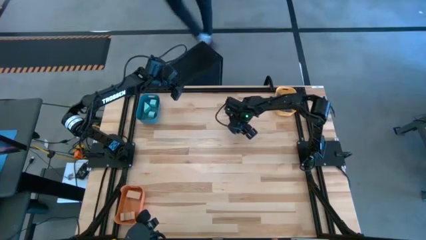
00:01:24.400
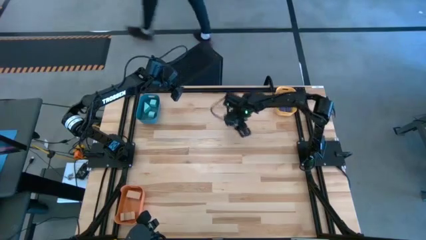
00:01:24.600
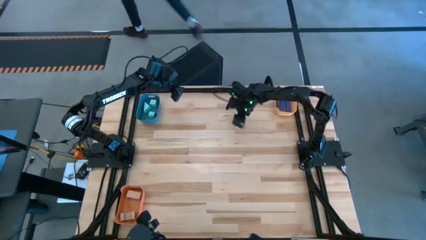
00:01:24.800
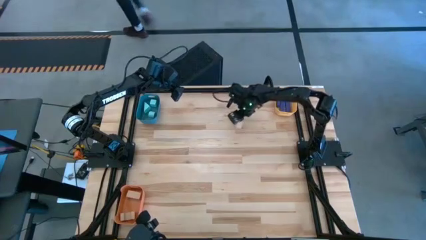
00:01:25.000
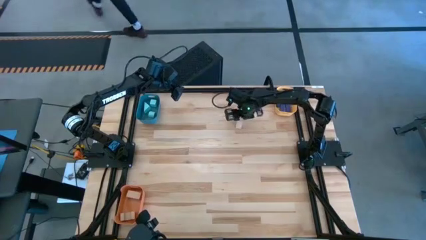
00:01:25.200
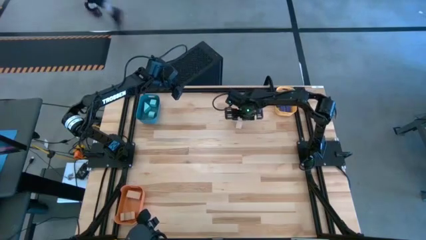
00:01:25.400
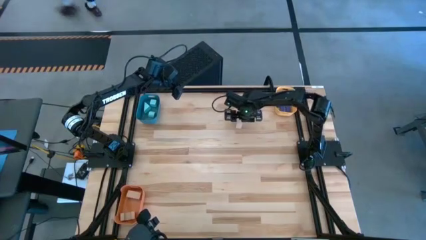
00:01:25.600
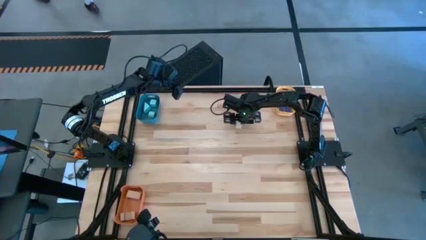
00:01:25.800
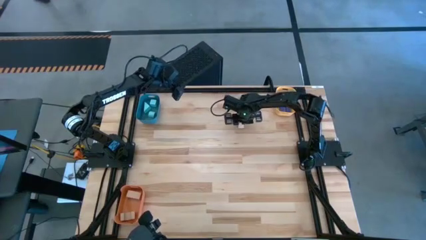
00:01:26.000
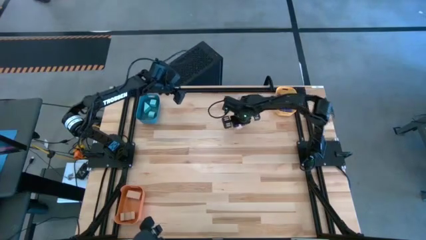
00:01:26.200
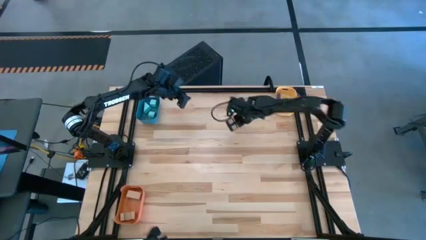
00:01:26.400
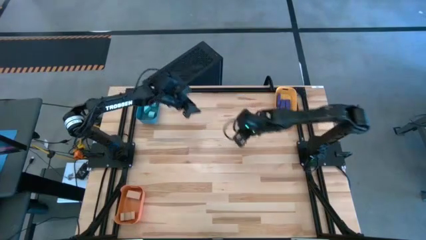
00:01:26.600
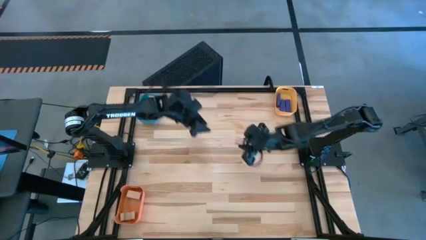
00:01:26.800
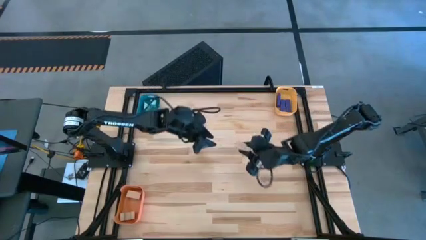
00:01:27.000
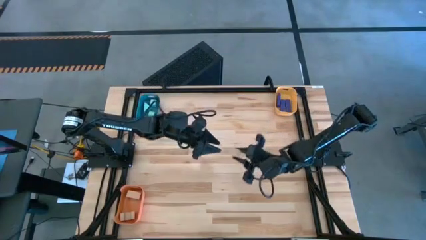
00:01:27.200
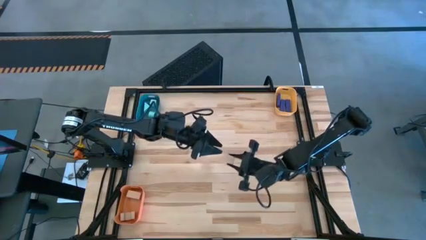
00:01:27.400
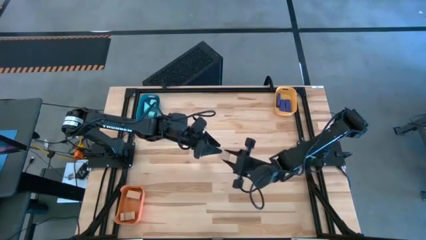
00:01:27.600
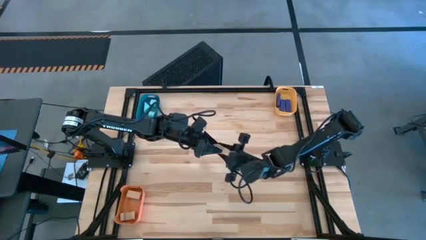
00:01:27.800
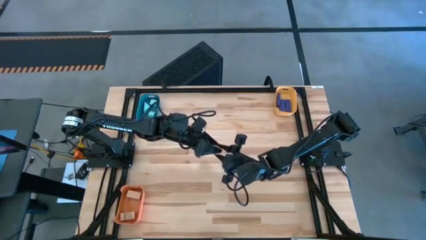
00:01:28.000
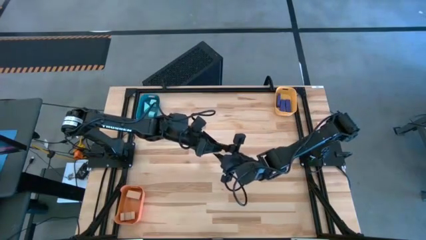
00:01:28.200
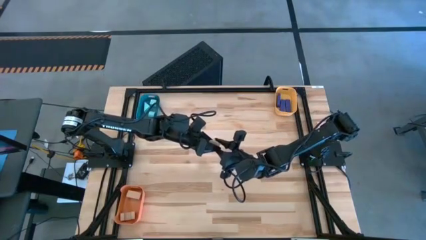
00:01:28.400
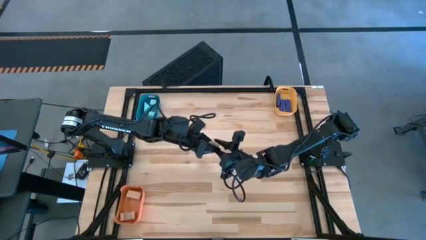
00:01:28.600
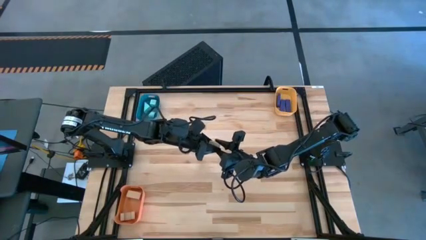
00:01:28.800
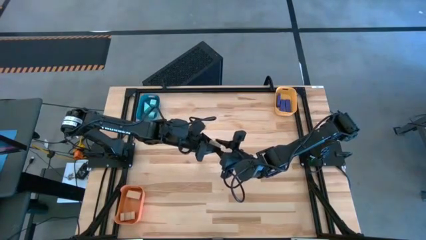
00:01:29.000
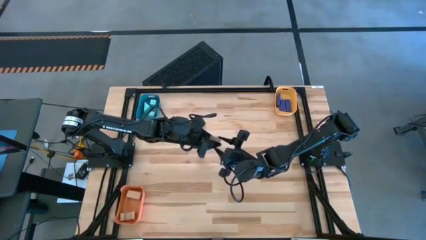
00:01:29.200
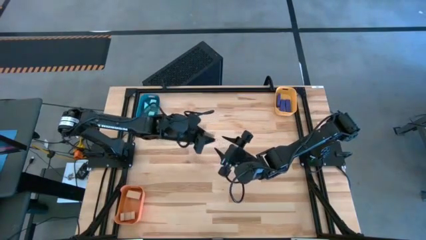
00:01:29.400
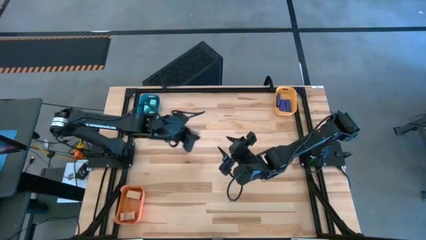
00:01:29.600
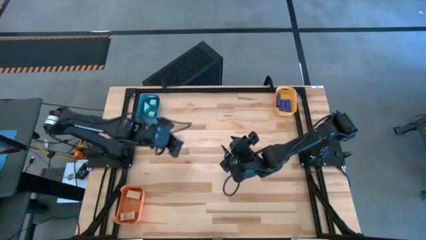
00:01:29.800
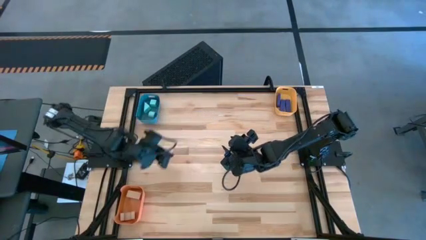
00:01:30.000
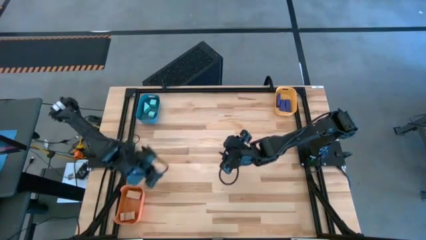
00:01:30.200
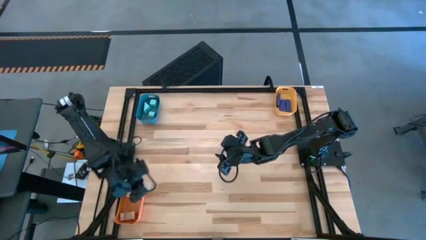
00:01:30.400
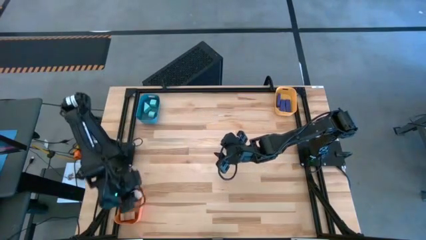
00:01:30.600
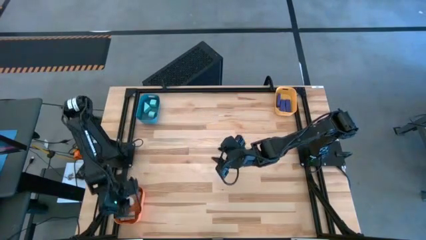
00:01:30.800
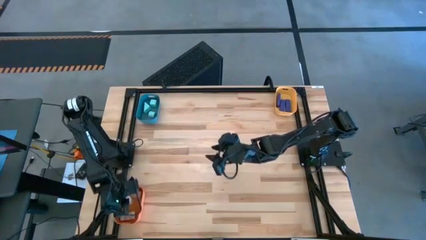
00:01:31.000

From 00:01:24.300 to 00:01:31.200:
Task: Sort & place blocks by color
Put the brown block into the orange bin

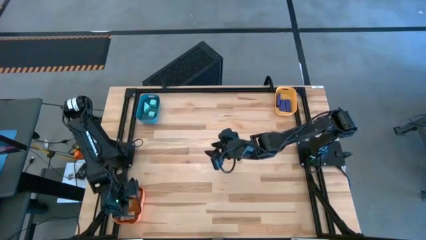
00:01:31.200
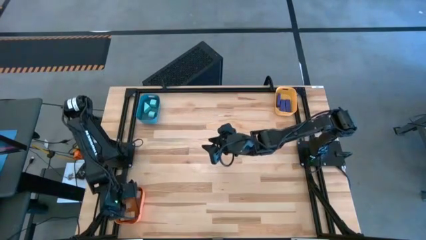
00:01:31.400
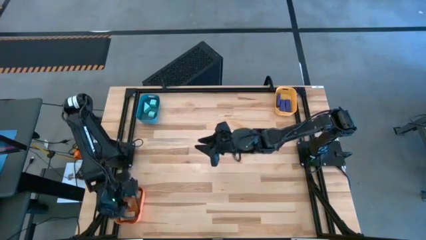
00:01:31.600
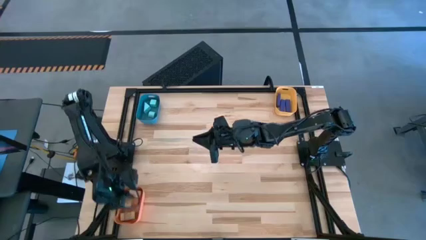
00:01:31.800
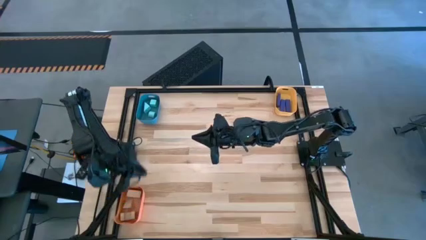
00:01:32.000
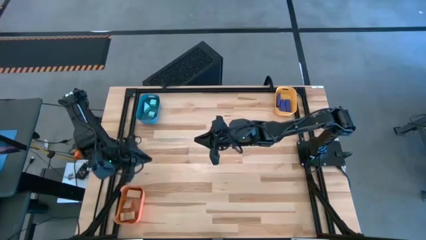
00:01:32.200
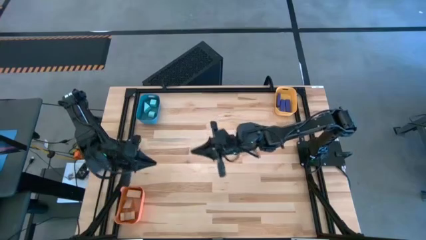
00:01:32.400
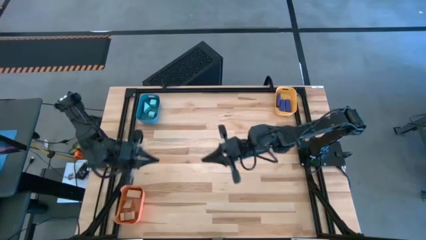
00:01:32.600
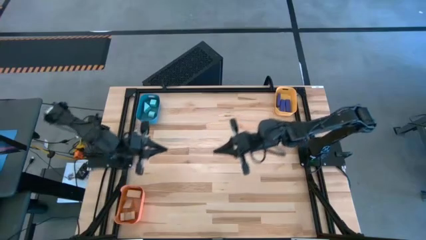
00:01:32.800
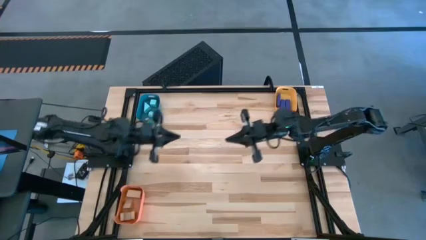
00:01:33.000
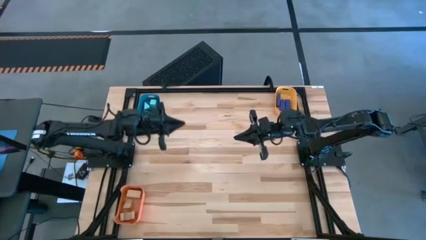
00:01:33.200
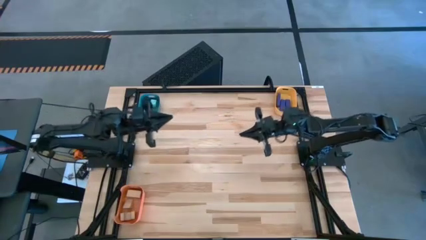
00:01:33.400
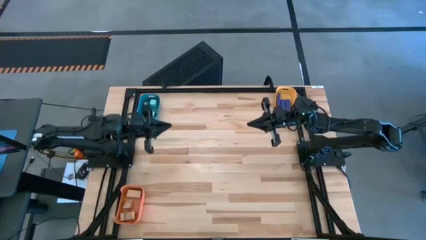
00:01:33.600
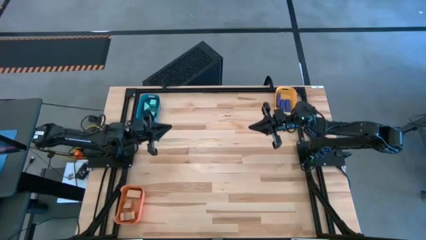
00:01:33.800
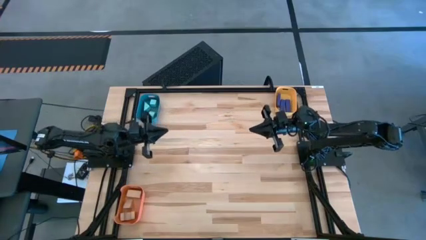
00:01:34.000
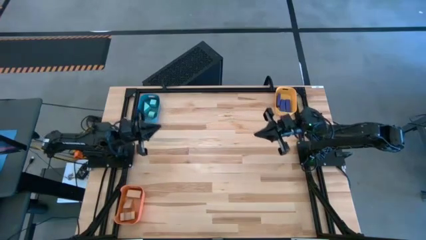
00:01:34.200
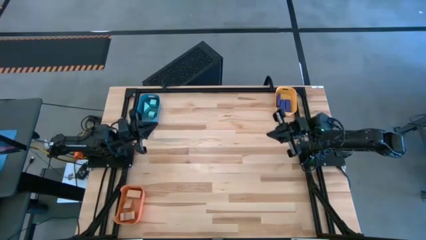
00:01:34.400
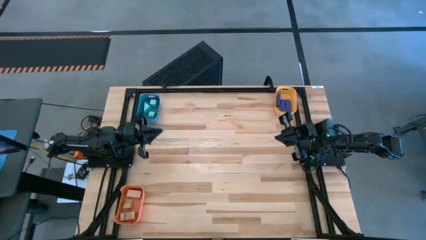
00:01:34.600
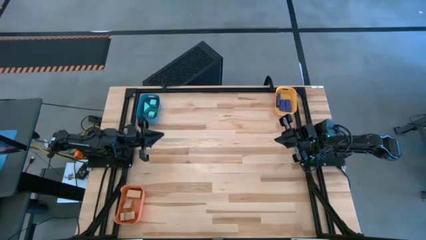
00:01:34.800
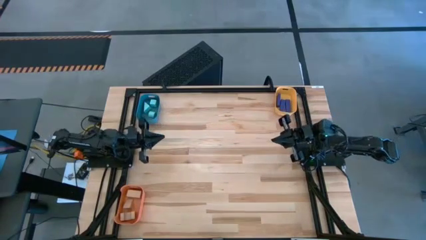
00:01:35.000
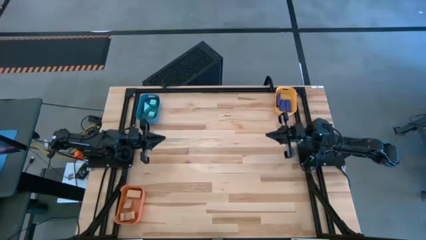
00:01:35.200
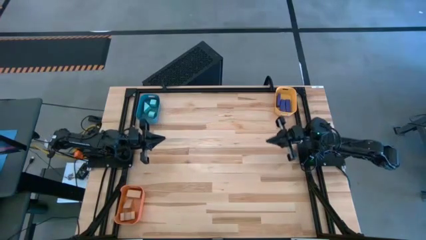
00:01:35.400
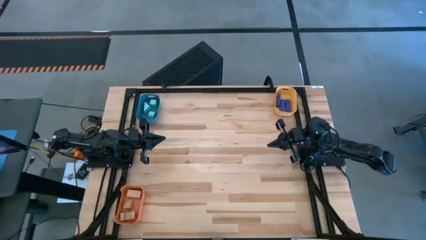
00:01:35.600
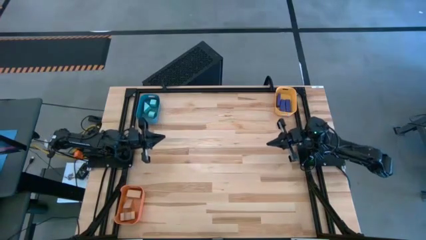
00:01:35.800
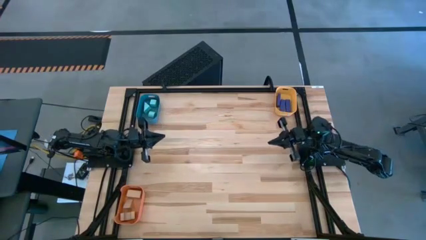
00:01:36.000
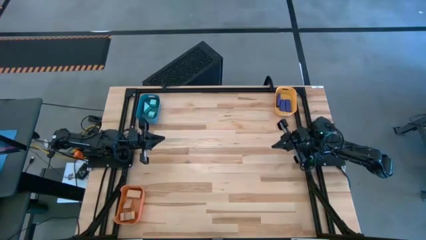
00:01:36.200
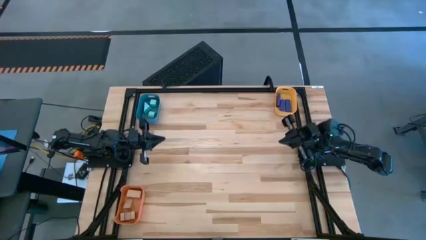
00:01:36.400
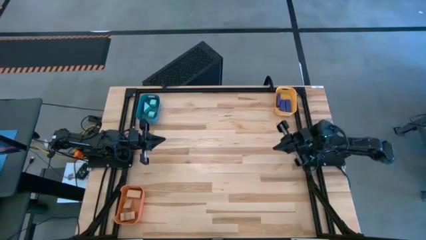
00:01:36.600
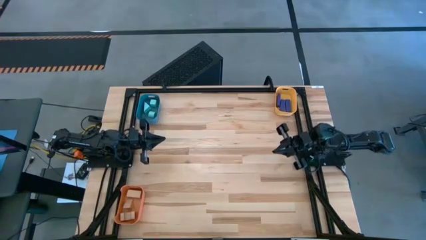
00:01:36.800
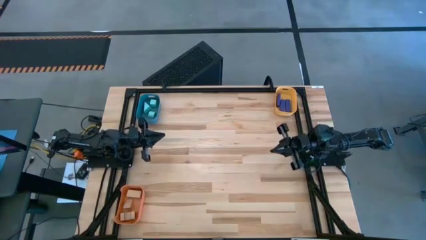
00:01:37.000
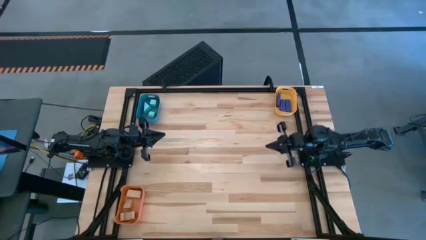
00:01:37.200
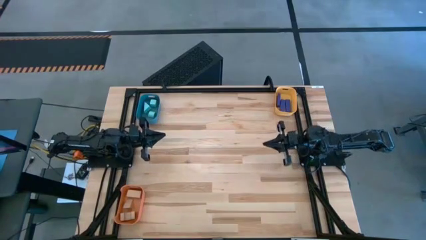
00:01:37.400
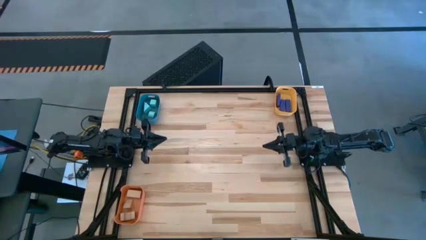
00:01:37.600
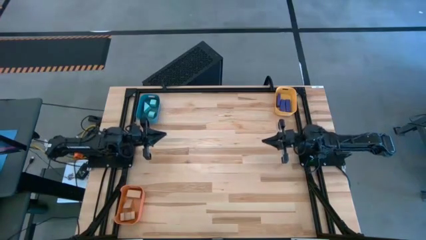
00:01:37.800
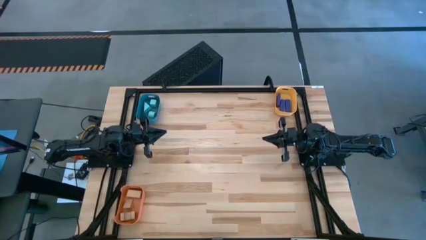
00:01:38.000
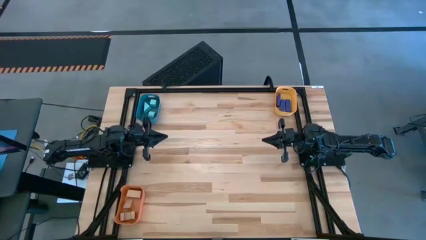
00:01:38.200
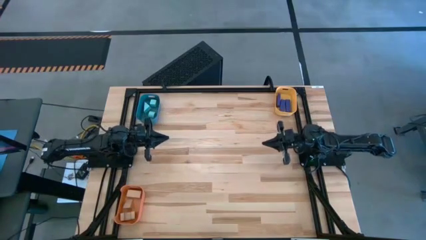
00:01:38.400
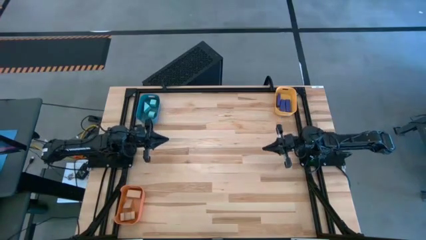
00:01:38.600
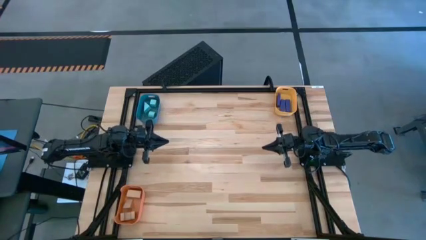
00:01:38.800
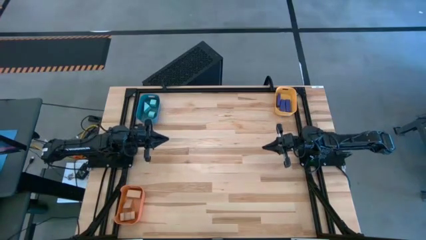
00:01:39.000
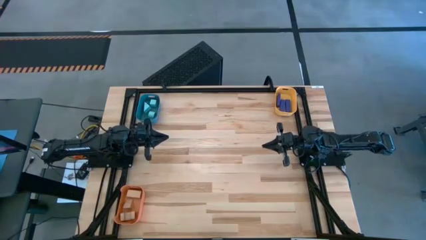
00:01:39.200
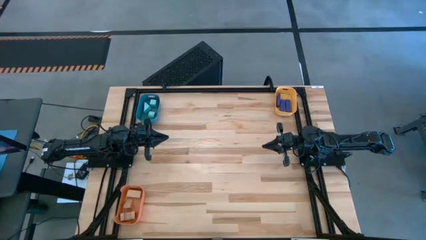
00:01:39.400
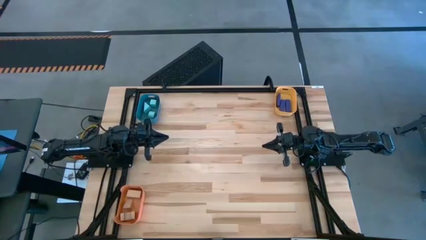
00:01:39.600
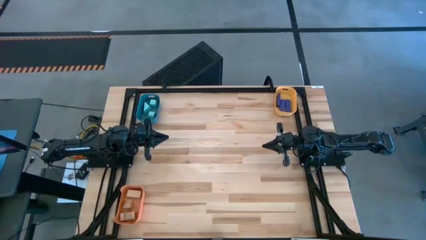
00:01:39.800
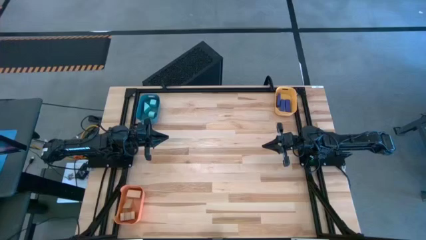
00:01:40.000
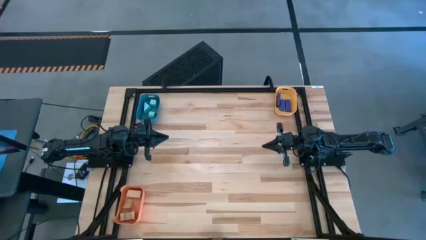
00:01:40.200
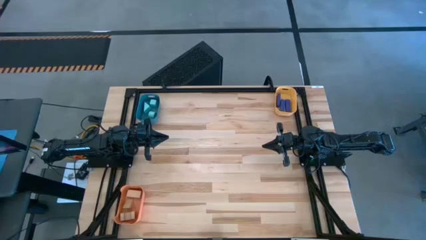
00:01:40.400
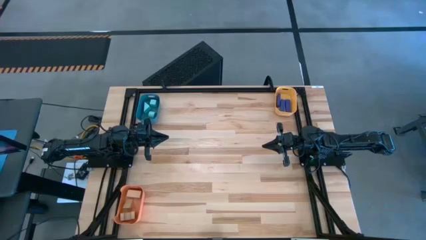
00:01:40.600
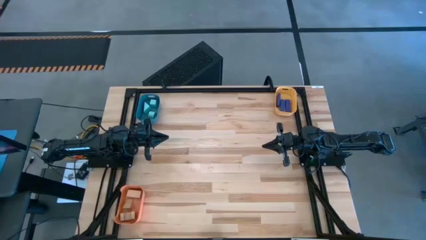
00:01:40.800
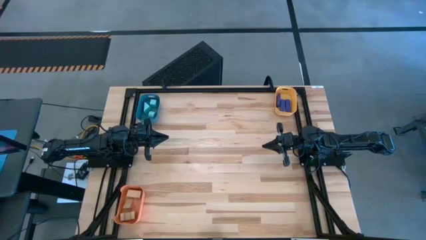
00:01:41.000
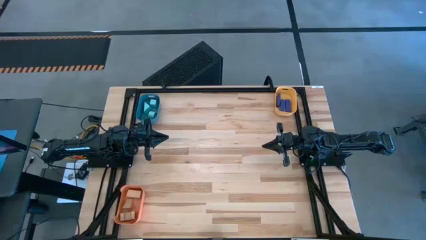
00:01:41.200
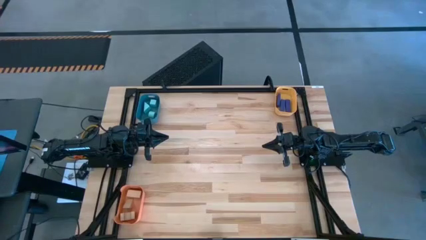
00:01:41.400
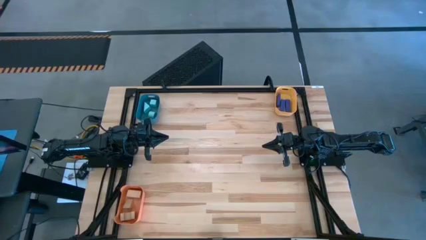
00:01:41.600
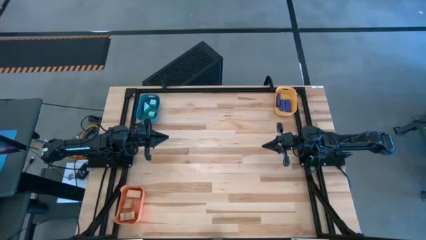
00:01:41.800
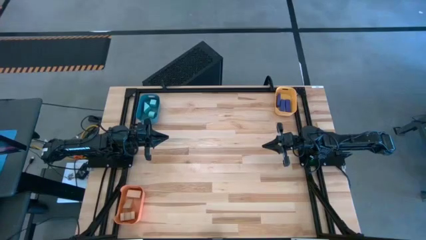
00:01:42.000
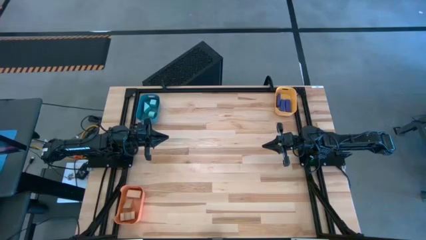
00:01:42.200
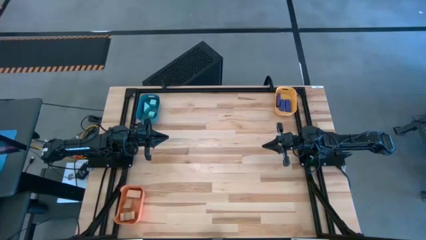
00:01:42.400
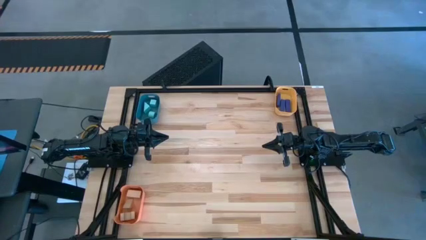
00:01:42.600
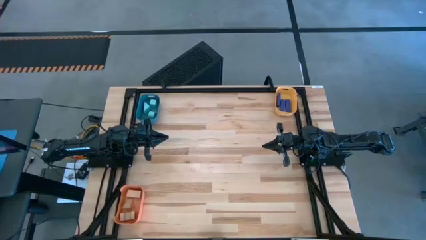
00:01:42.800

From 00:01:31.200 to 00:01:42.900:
Return to Home Position
